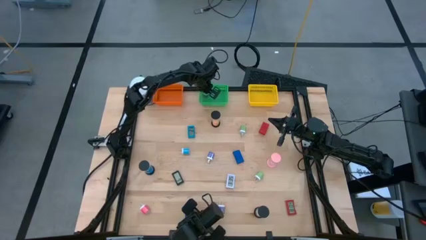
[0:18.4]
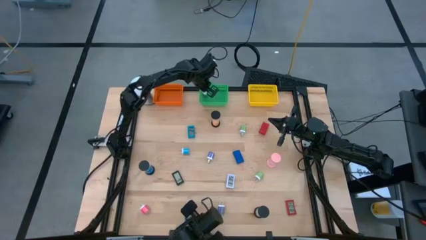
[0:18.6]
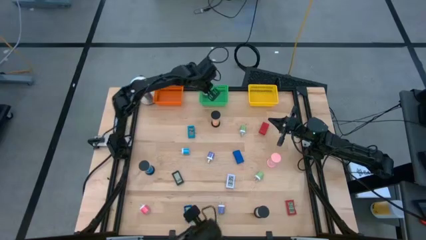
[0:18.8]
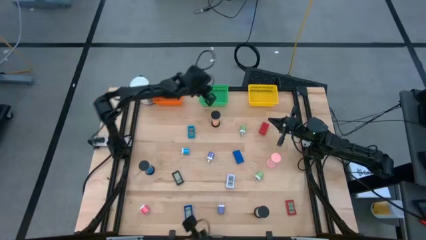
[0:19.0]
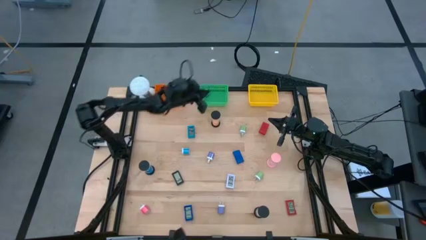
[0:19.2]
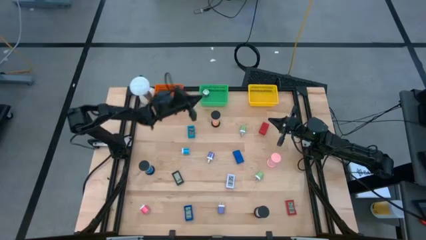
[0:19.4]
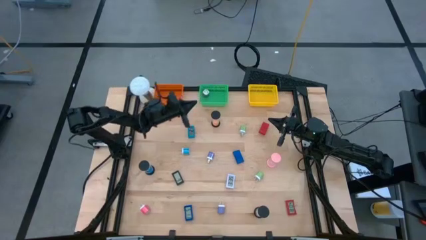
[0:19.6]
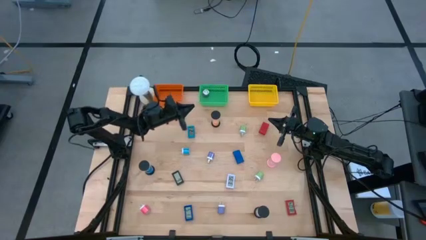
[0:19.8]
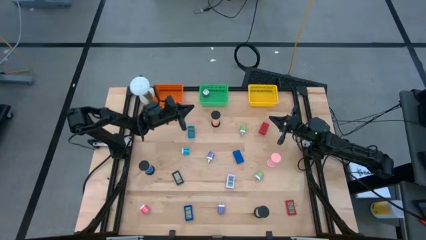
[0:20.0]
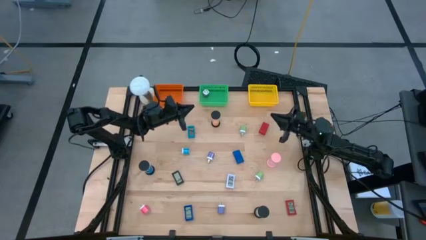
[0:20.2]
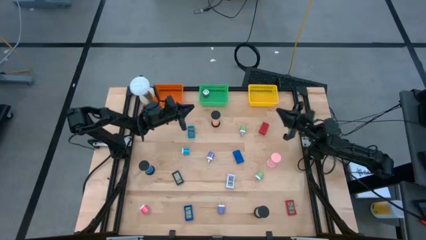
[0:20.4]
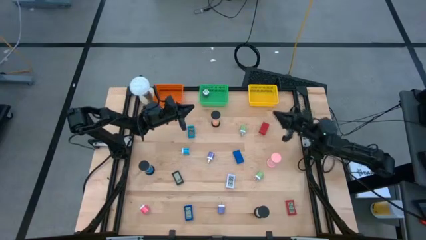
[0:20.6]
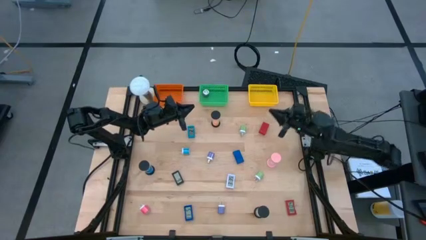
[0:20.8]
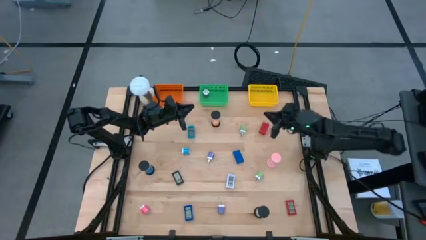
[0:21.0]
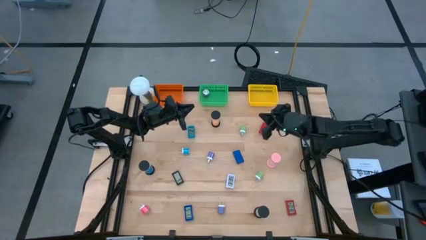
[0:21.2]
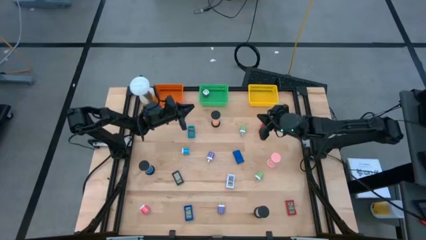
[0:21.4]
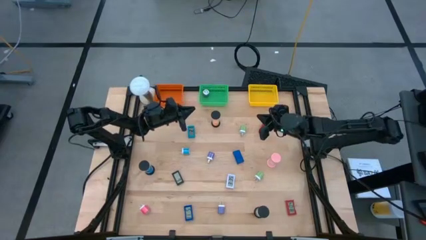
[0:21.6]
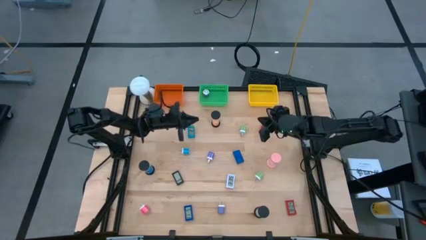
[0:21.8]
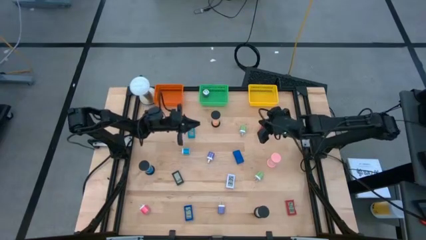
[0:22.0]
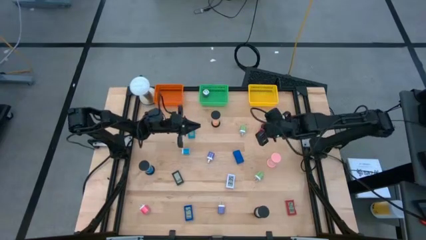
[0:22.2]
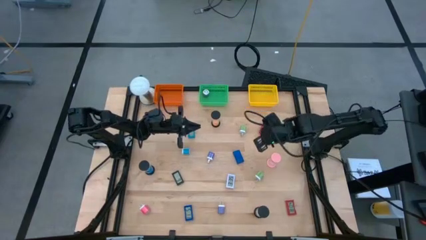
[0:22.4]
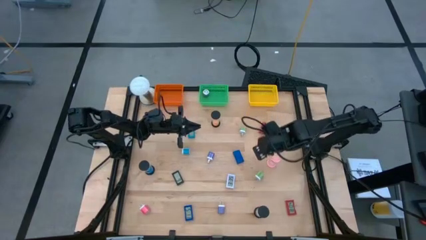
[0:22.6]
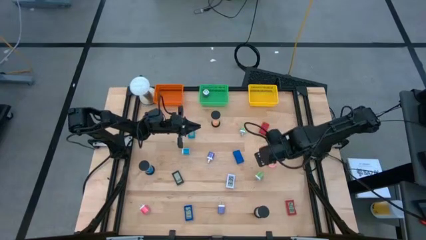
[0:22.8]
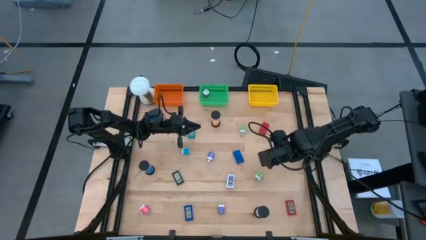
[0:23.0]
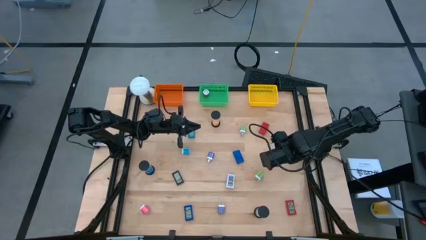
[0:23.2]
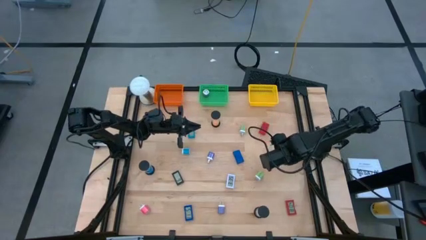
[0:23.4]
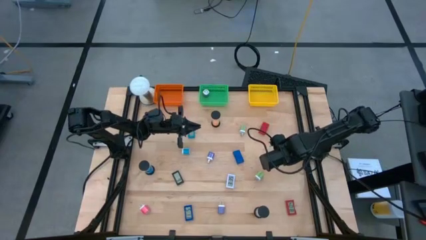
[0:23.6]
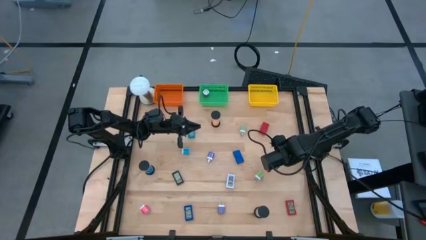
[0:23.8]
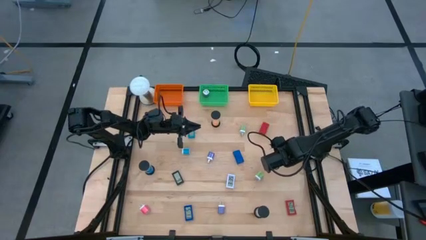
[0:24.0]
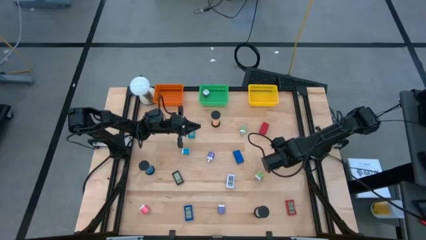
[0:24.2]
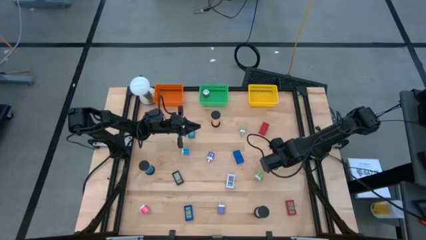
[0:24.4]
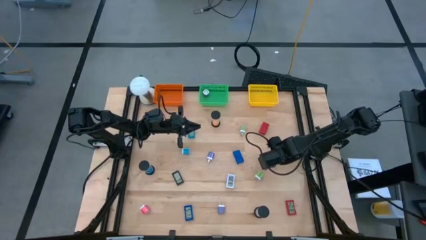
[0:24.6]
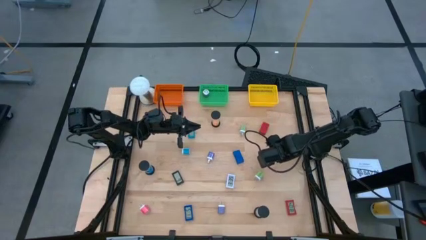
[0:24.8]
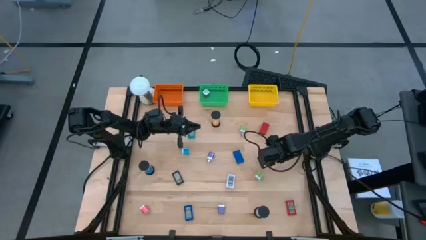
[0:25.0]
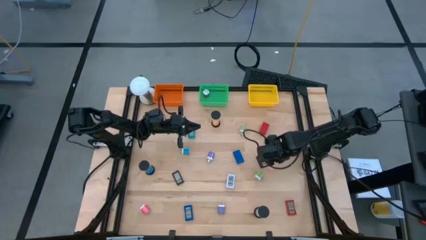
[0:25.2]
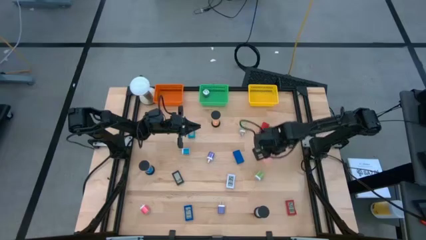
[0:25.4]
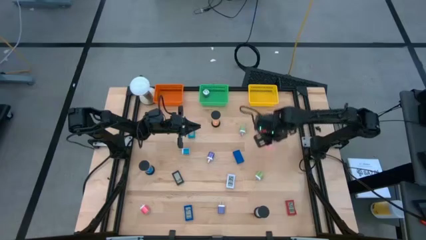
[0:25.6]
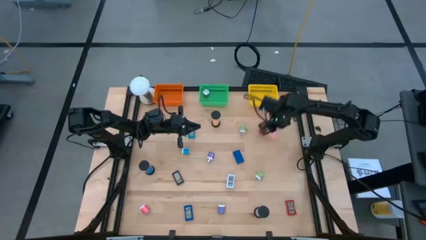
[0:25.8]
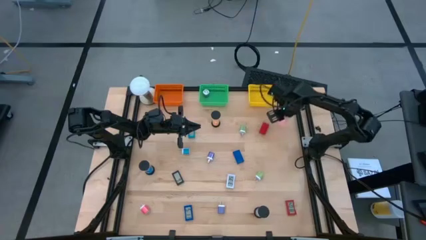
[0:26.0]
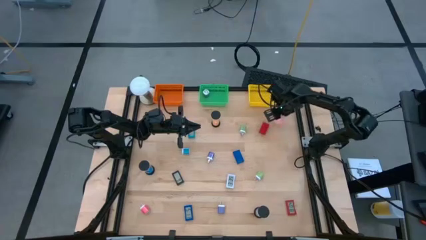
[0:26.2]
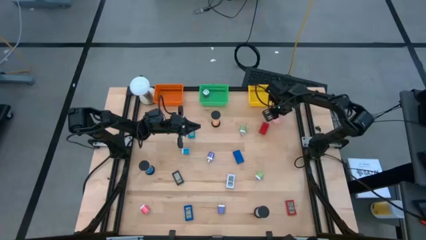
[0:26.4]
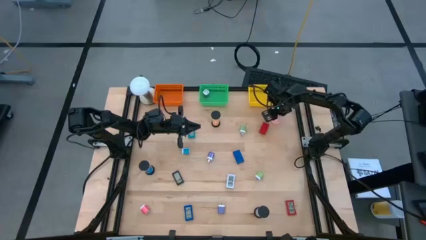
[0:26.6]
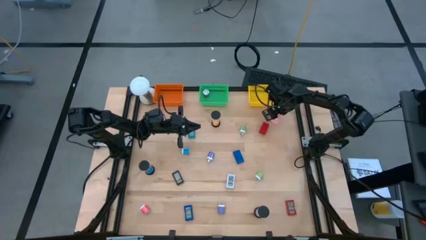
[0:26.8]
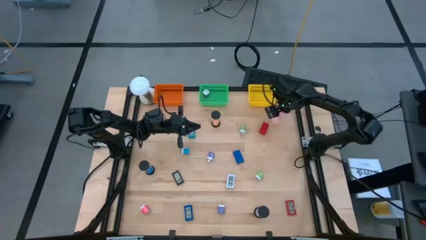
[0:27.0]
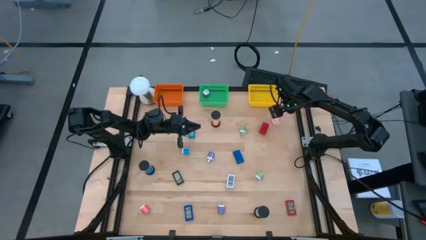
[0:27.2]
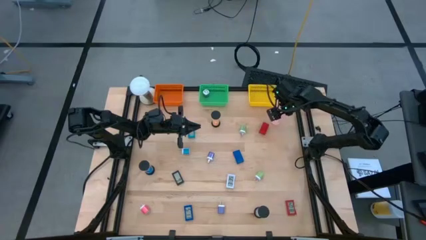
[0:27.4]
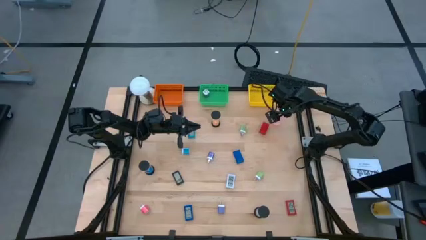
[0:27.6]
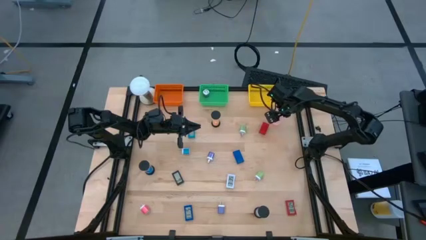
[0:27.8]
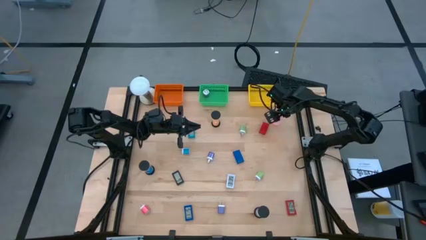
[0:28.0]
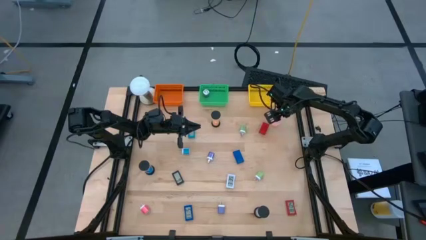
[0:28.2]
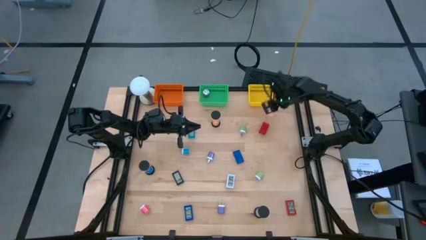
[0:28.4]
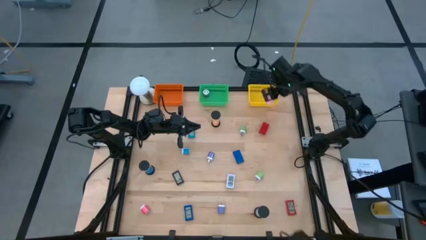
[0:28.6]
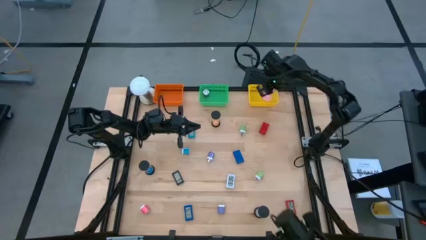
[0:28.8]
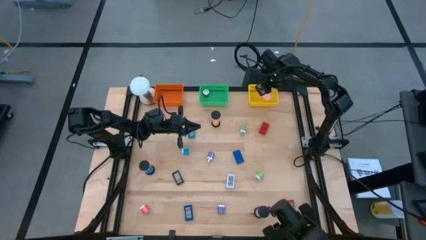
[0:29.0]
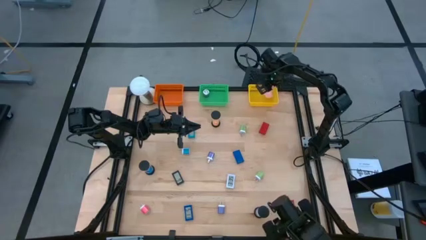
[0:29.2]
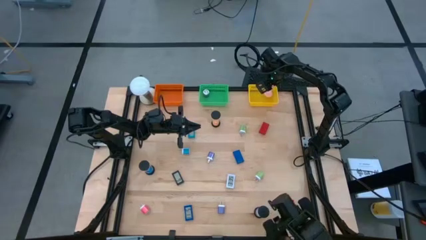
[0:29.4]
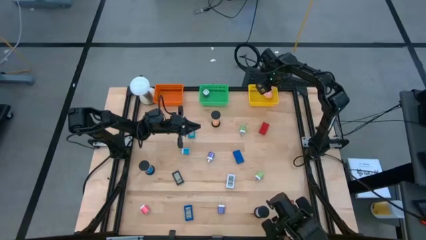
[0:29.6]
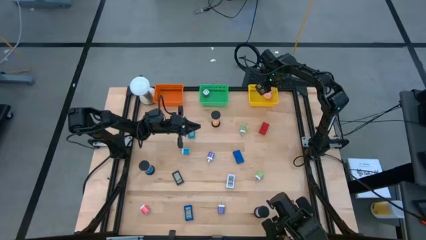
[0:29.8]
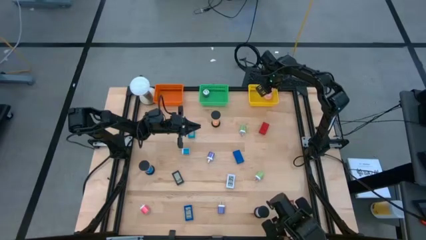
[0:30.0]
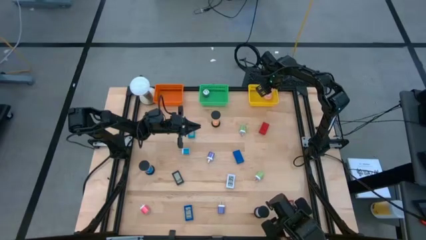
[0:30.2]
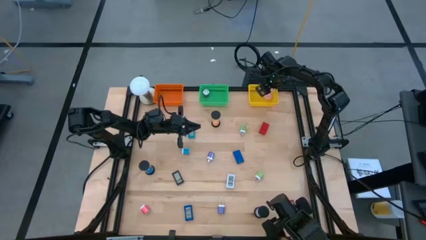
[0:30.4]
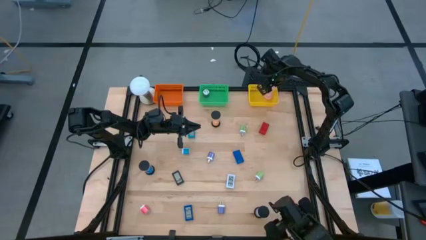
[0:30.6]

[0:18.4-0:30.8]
Task: Pick & Place Office items
Put the pink hourglass into the yellow basket

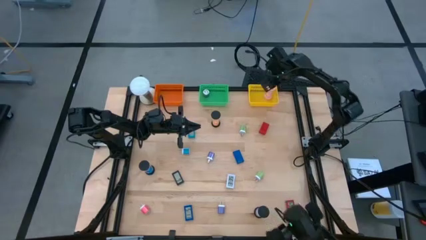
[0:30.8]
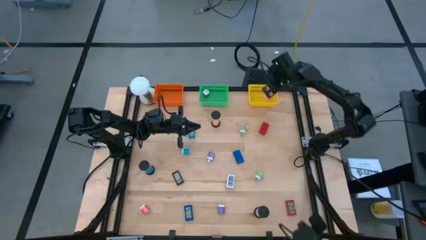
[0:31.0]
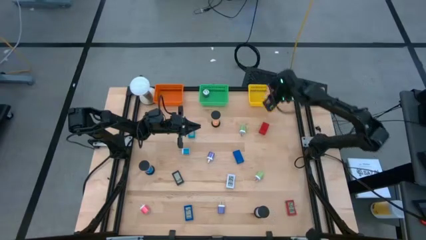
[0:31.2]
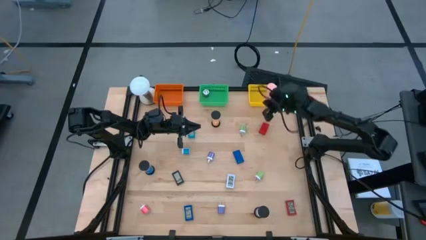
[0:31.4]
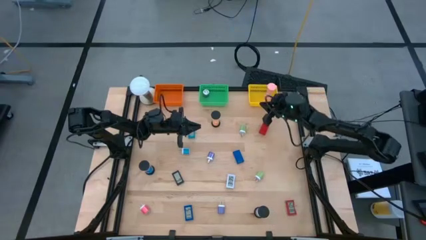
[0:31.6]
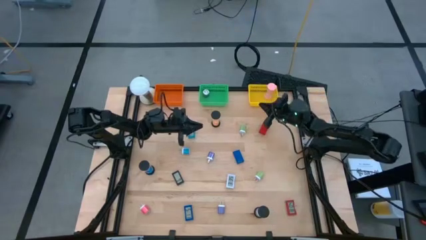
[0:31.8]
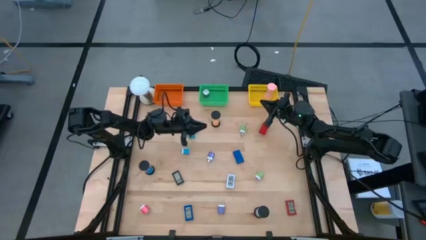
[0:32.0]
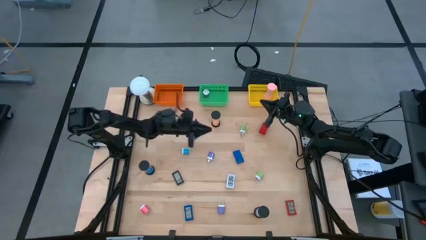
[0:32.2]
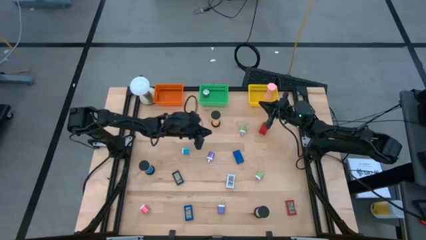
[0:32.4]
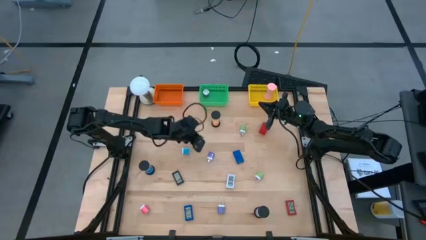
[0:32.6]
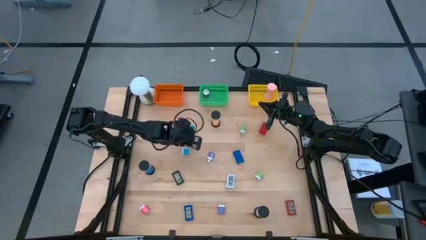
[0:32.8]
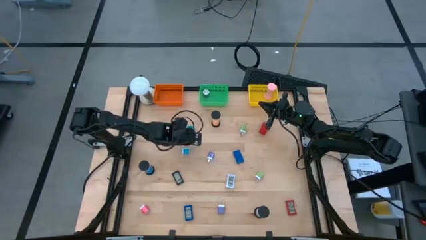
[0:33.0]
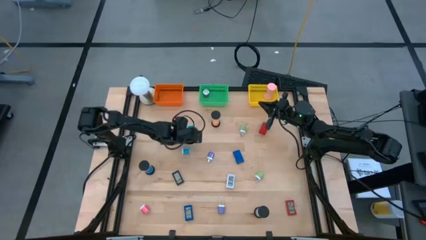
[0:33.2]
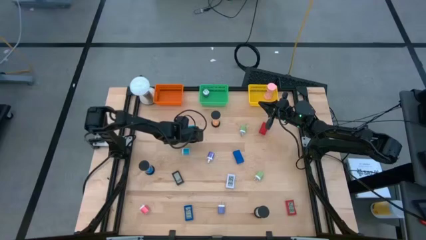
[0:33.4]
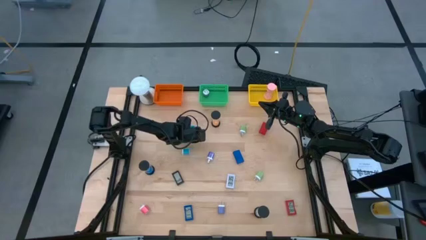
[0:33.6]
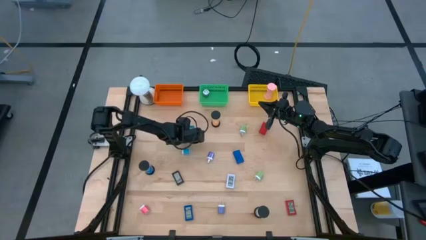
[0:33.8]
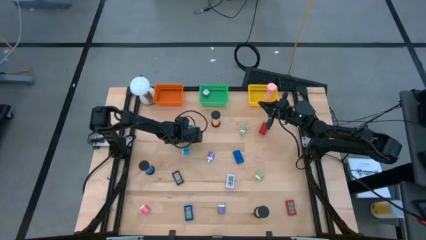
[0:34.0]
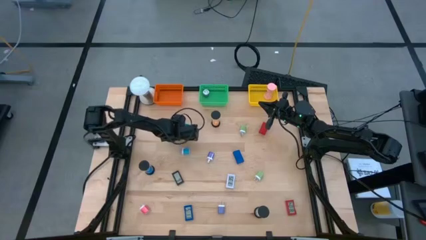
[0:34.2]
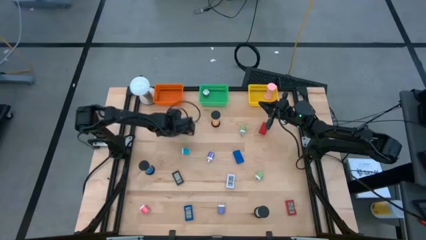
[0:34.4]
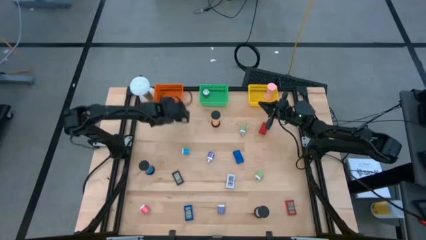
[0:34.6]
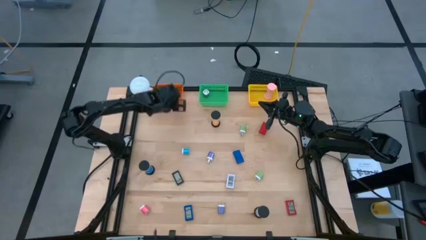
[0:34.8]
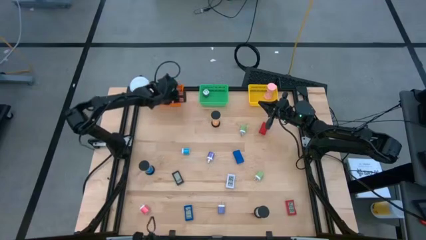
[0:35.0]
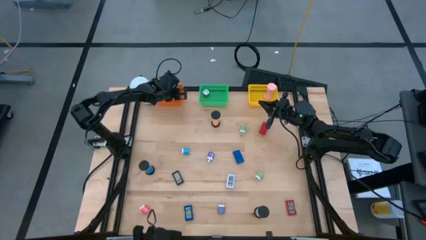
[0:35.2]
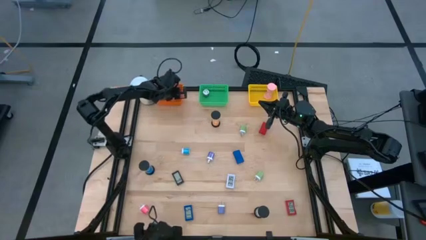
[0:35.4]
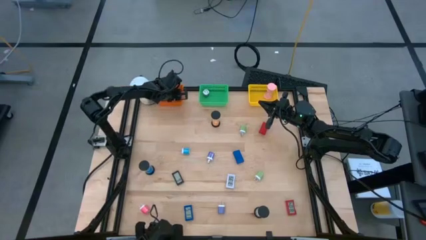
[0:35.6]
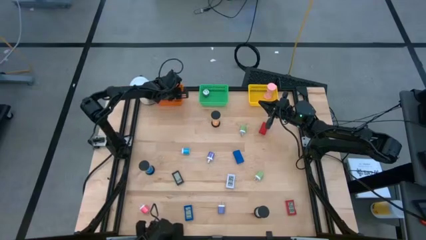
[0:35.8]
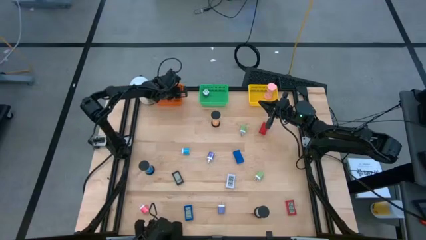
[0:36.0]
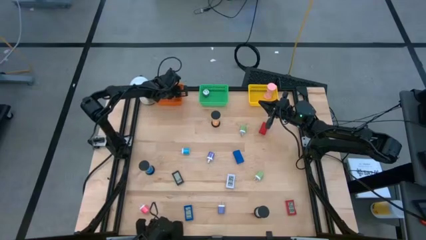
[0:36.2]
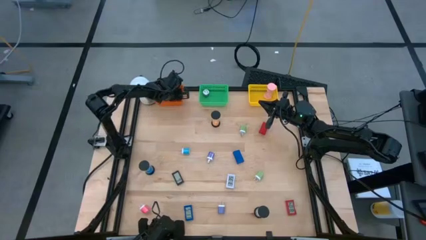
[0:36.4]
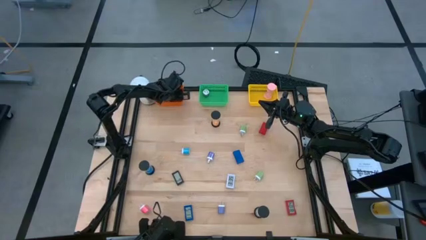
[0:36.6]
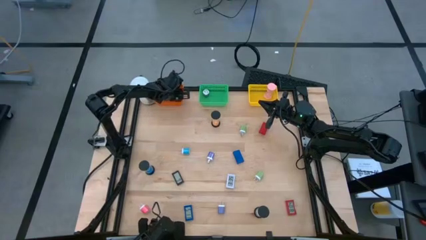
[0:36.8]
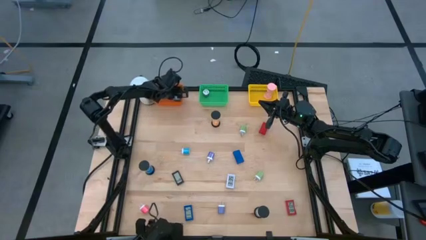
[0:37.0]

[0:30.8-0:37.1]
Put the light blue digital clock into the orange basket
